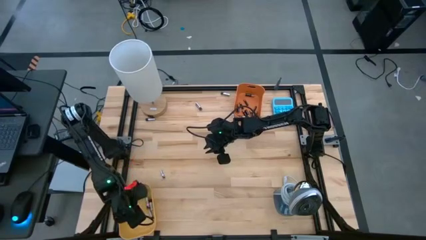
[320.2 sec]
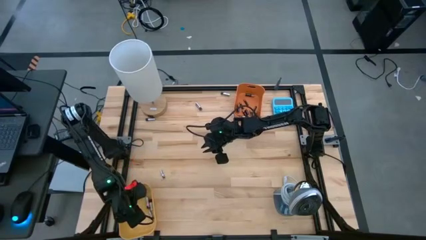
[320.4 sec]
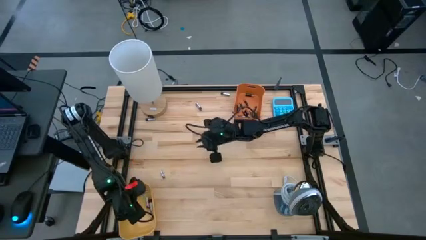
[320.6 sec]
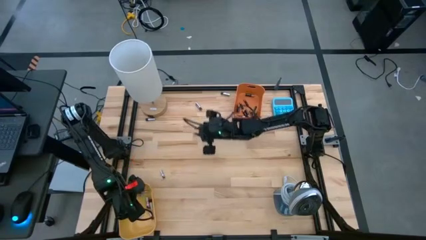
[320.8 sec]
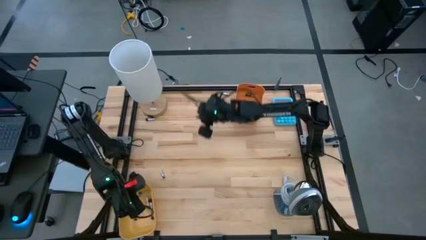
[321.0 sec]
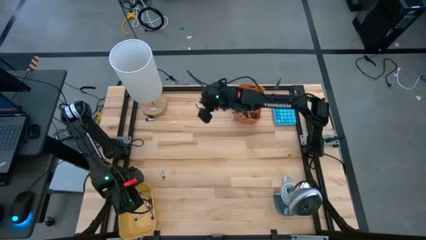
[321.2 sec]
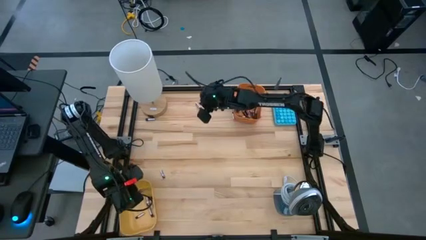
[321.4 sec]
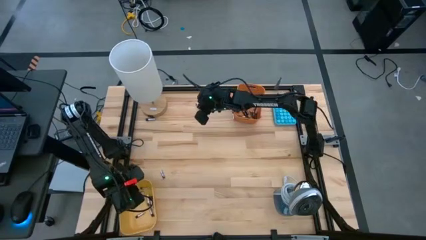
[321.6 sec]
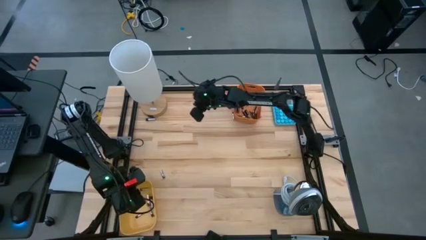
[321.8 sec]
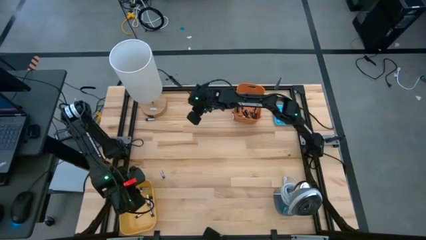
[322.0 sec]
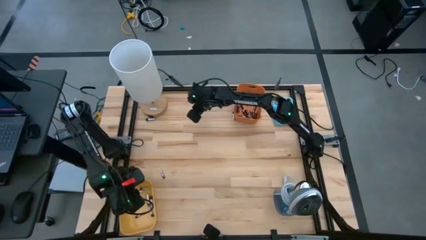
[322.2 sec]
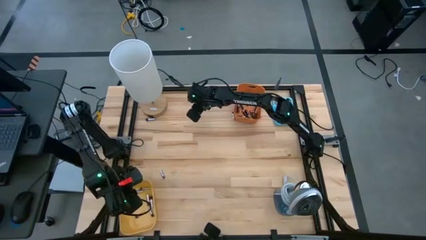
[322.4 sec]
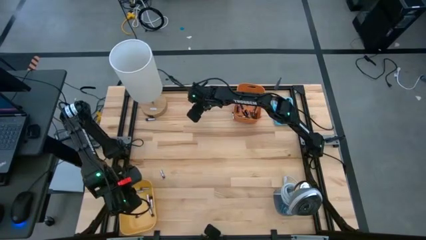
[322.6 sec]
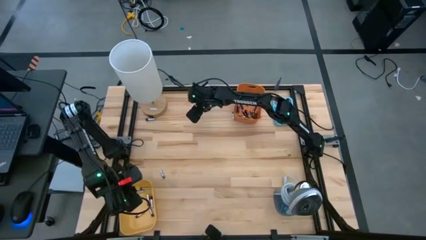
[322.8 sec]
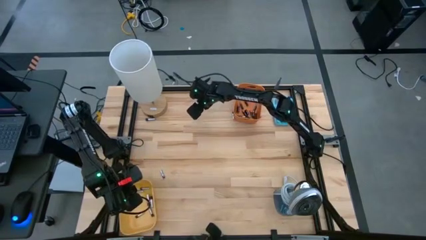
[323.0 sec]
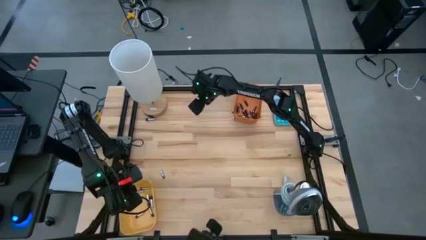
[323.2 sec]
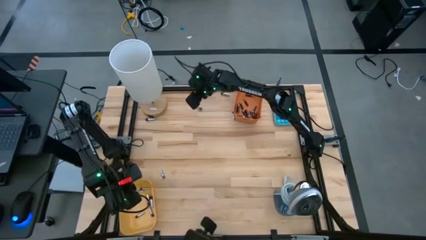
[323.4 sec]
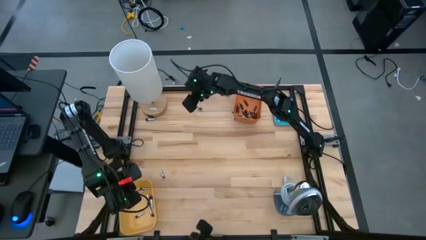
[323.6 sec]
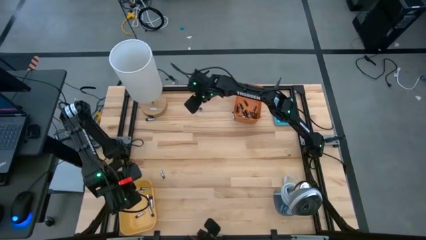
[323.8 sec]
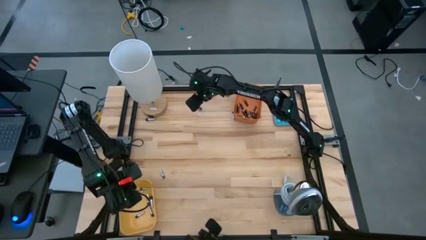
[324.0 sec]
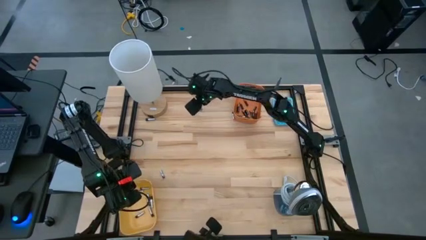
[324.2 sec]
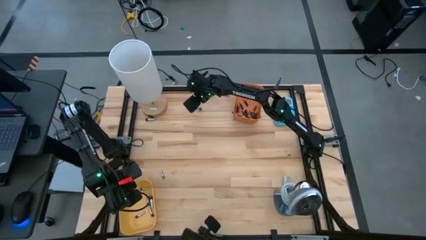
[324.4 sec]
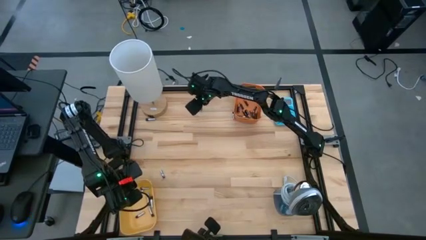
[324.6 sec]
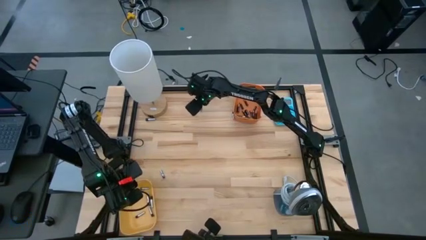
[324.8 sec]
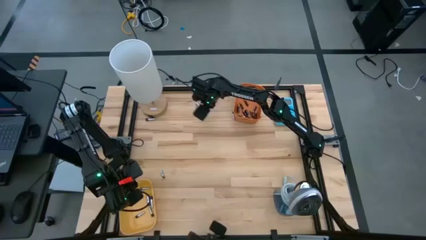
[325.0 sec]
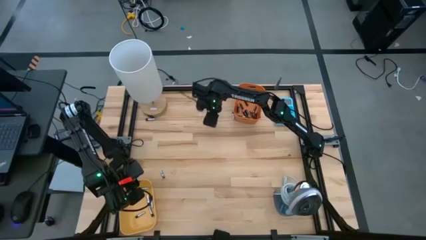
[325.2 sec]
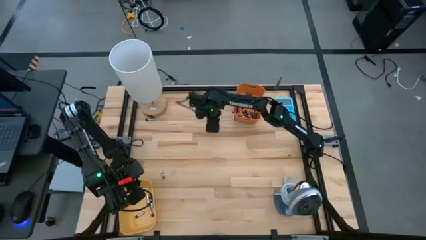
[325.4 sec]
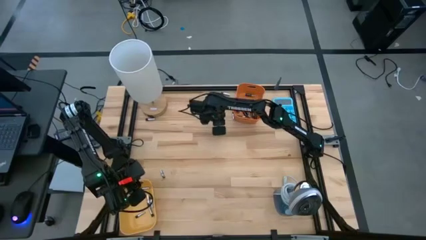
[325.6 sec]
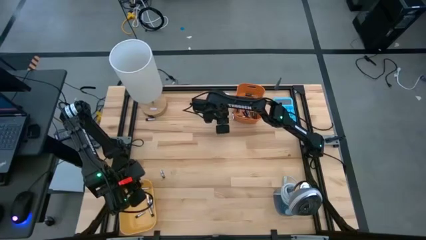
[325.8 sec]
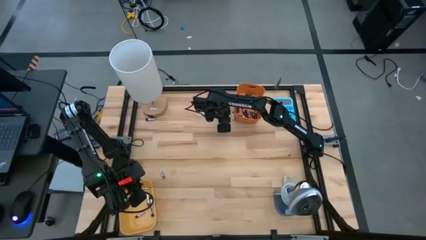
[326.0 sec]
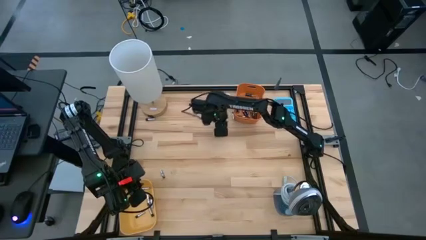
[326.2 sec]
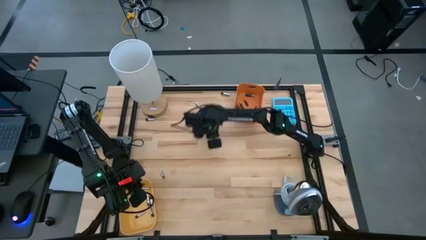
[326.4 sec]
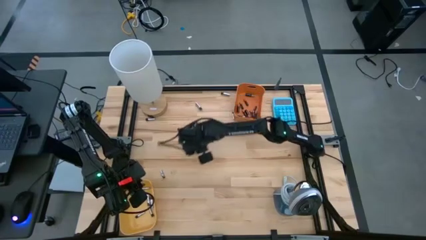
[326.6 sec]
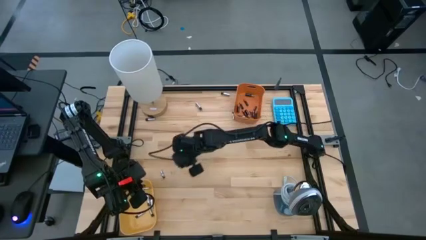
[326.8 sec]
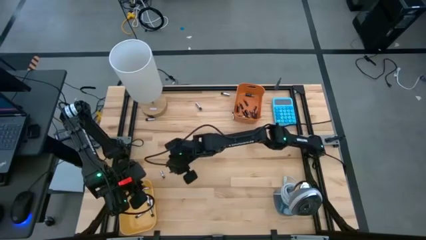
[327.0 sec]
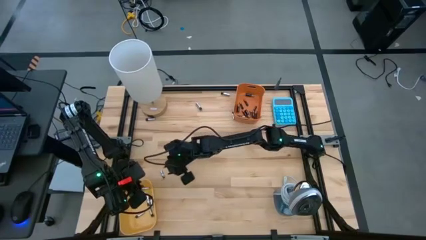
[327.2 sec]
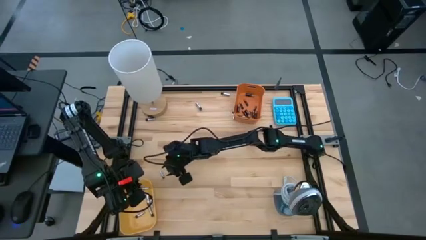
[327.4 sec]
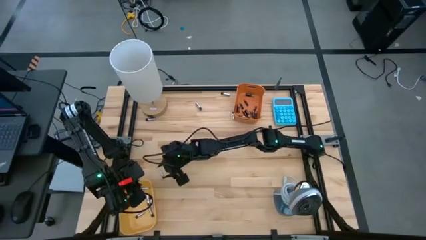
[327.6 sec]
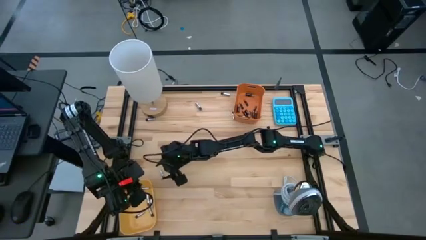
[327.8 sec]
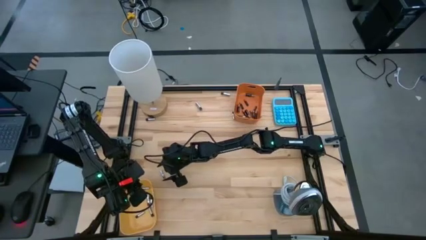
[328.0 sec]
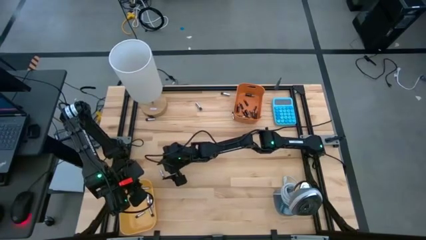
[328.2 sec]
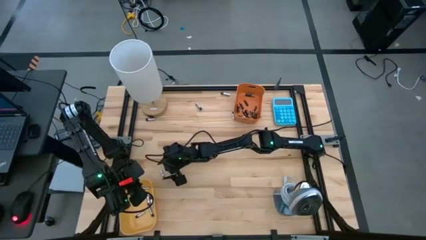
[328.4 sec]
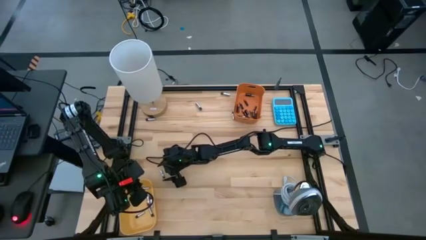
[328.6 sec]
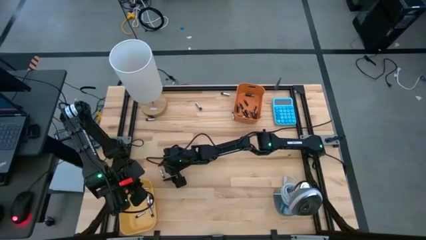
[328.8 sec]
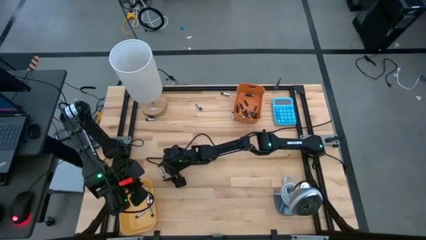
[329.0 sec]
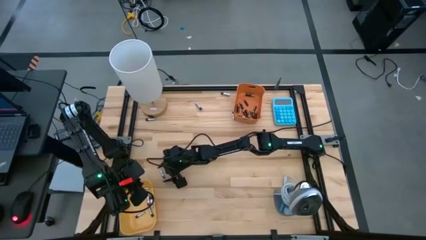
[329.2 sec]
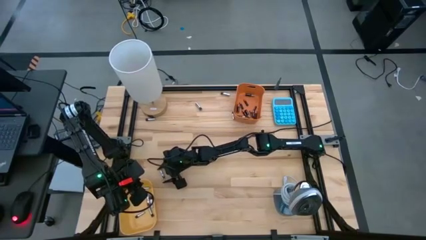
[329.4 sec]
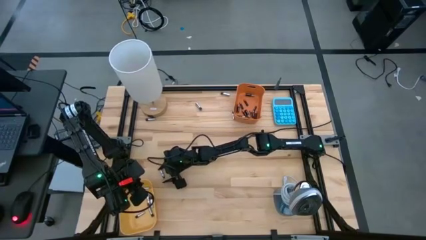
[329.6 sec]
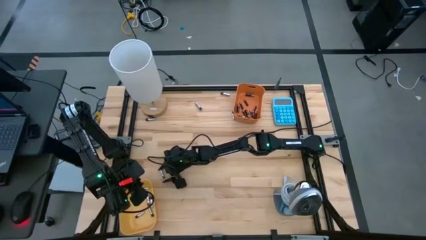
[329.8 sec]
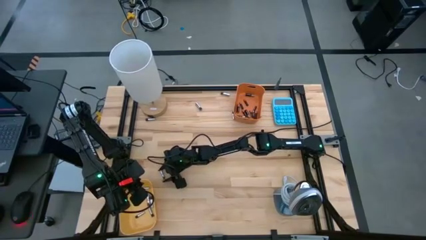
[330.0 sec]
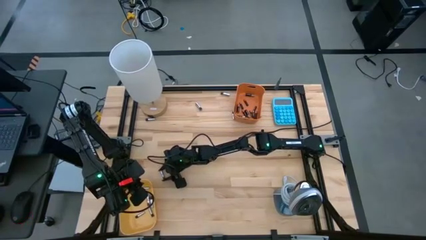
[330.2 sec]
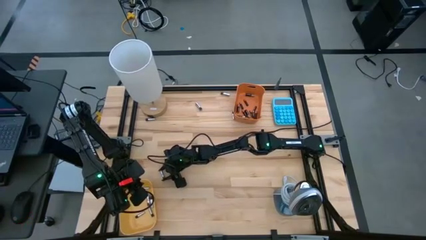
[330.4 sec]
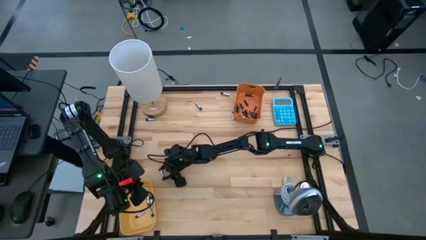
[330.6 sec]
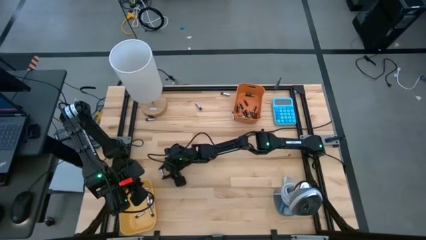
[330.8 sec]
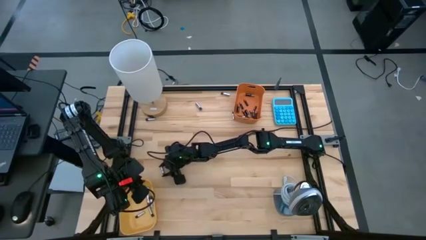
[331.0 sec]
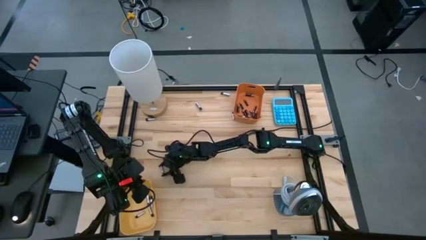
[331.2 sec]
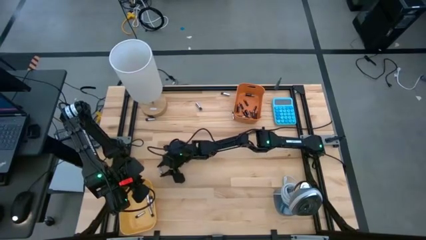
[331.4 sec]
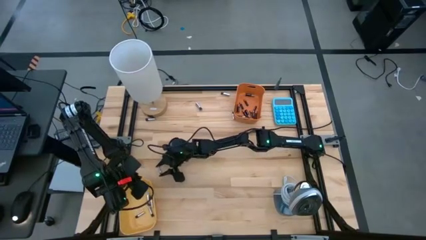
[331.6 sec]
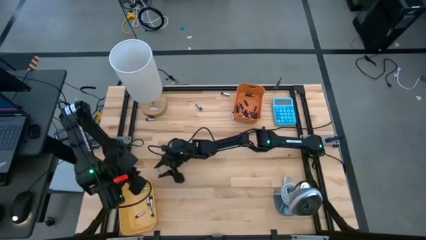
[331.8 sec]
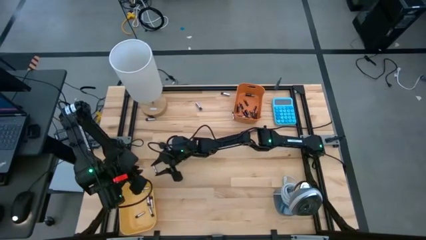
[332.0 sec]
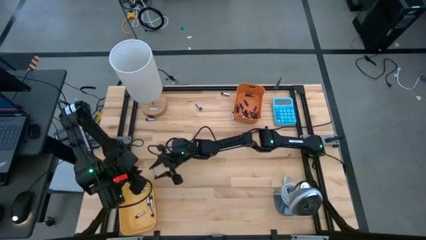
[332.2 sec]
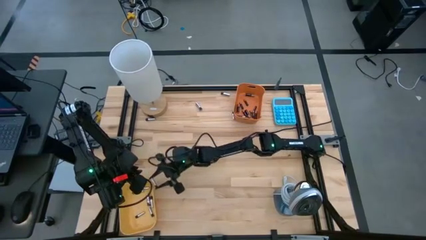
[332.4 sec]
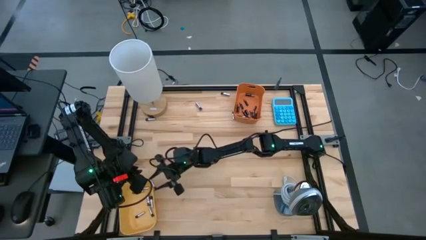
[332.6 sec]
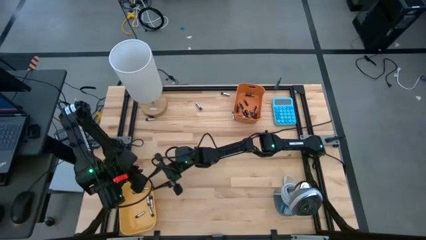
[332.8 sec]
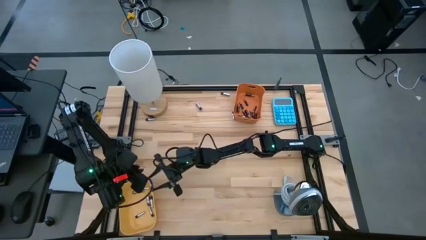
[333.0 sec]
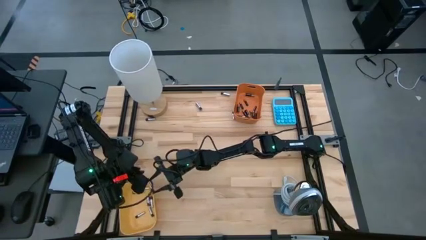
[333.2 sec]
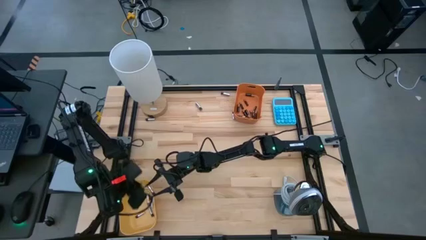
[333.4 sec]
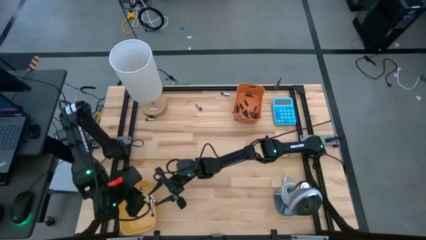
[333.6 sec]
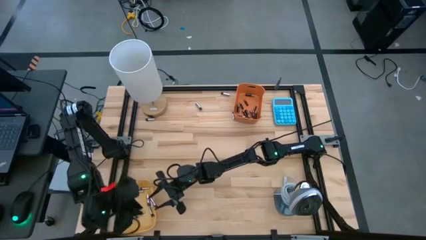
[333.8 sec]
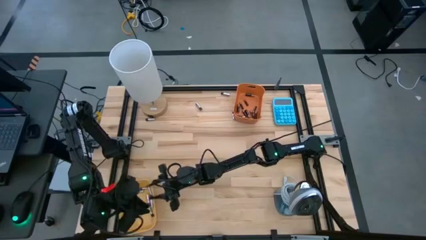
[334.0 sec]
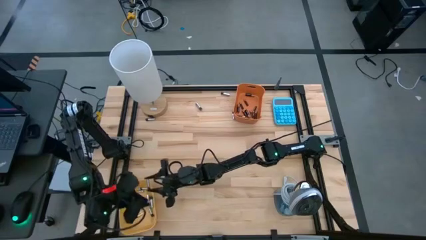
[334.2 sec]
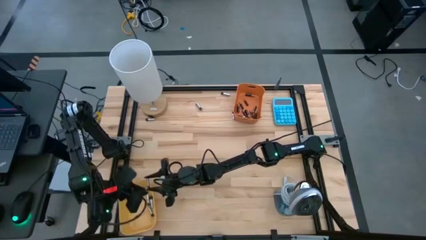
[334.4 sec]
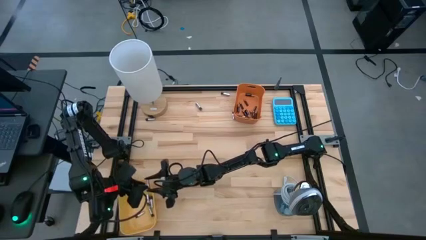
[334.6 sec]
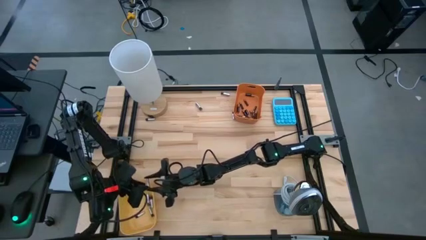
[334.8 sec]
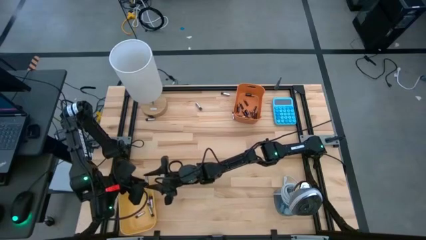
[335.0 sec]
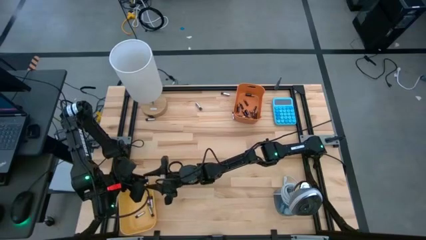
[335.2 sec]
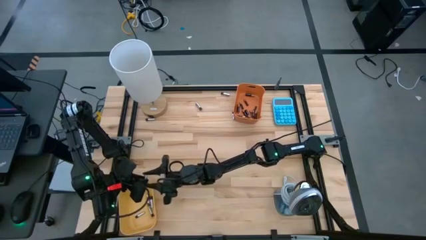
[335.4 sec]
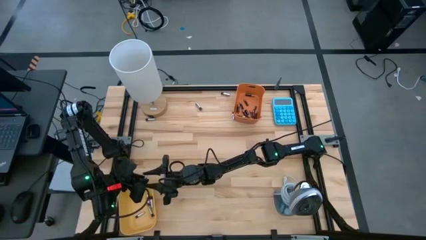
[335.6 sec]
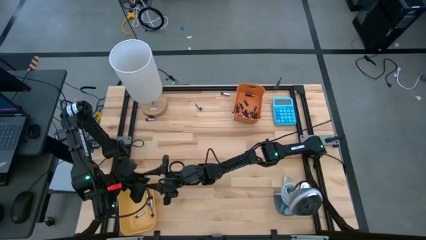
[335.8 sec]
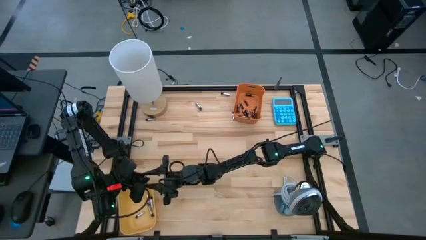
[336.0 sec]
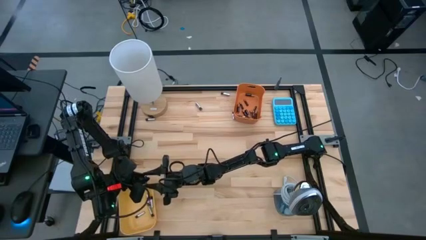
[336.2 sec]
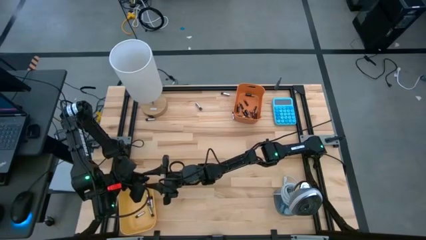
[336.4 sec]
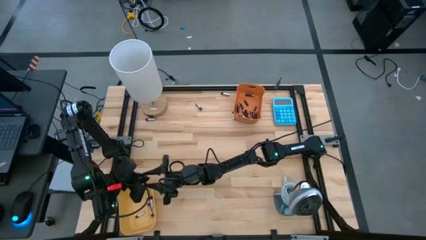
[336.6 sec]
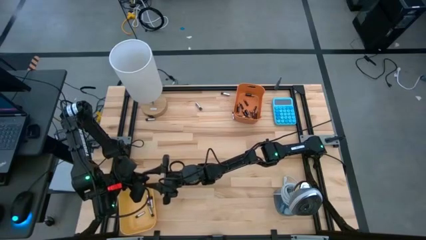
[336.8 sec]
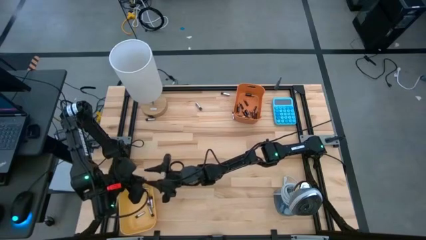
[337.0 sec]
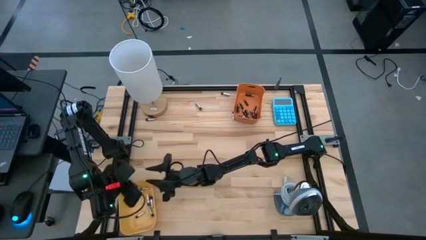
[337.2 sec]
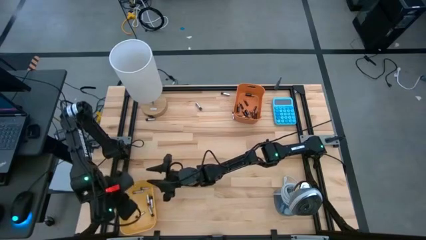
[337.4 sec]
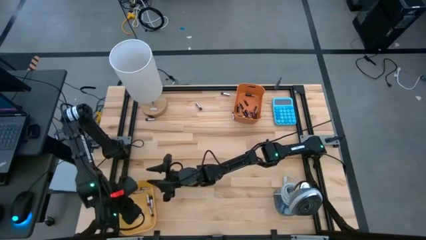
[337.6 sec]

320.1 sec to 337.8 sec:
Task: Sort batteries
Put the silver battery into the yellow bin
